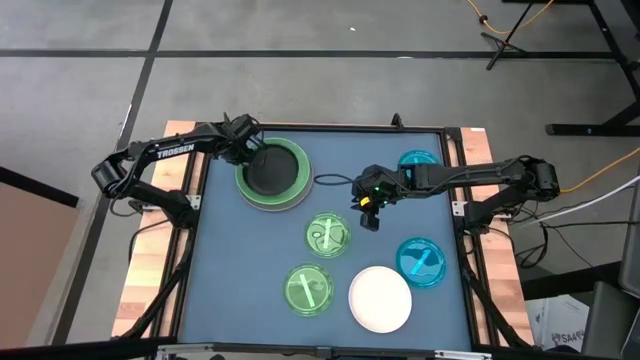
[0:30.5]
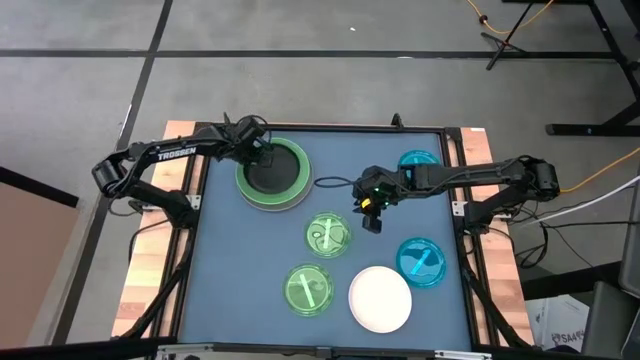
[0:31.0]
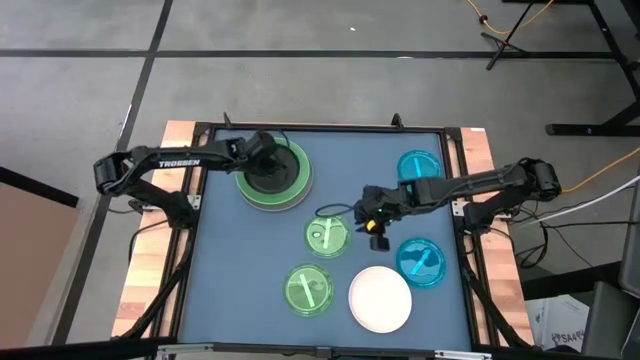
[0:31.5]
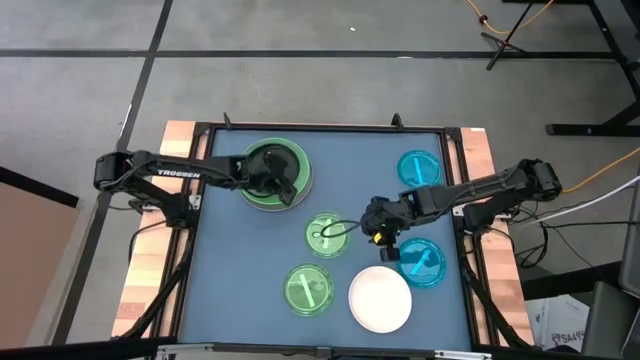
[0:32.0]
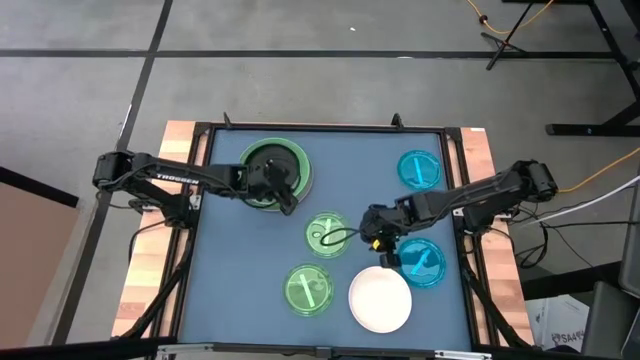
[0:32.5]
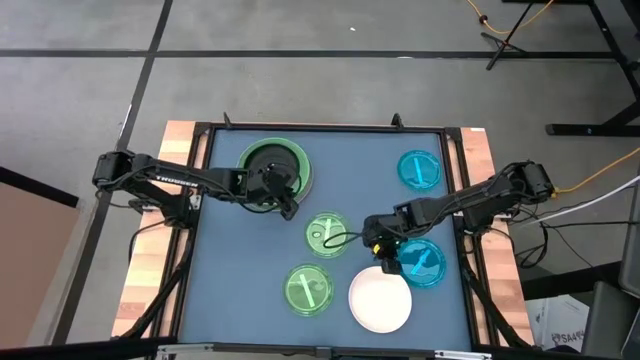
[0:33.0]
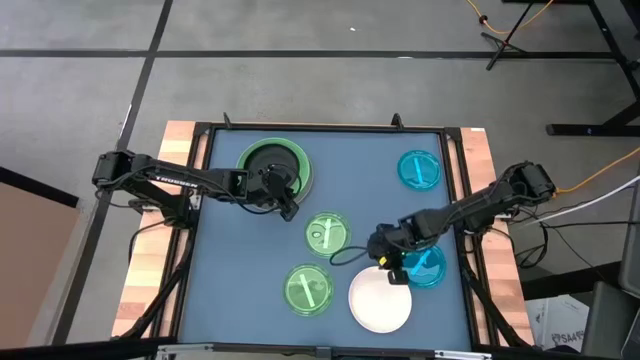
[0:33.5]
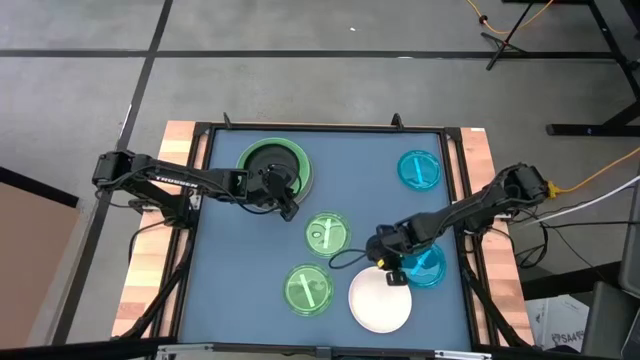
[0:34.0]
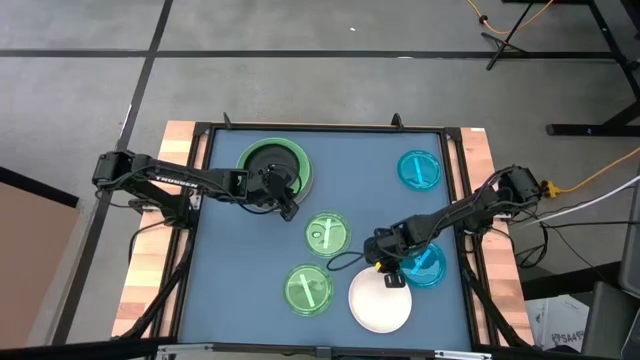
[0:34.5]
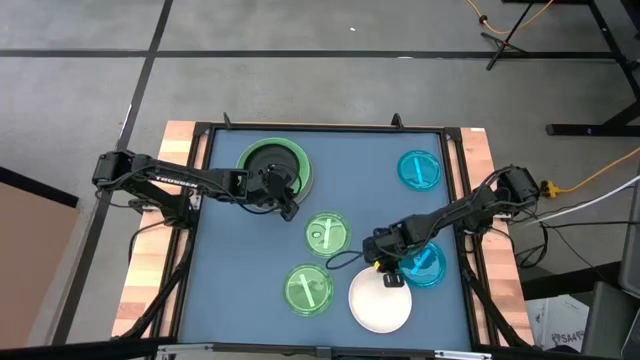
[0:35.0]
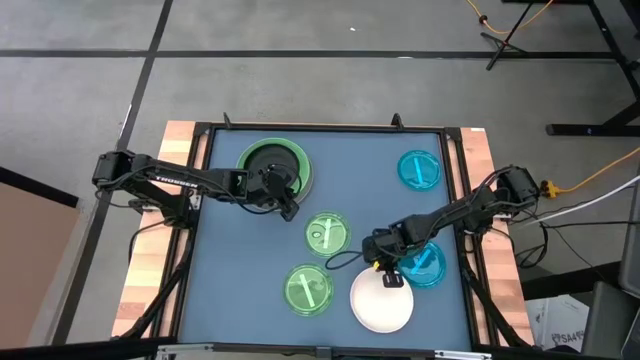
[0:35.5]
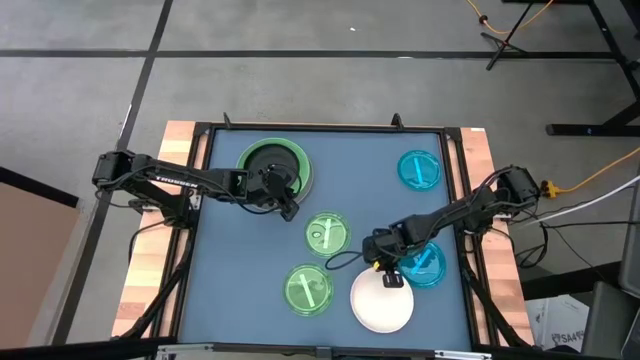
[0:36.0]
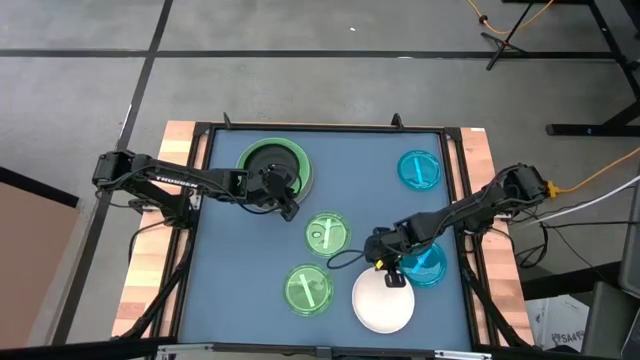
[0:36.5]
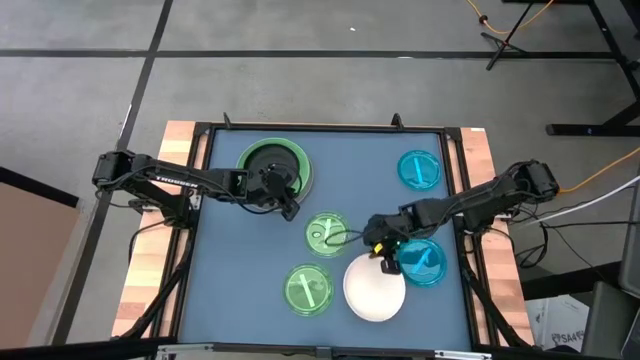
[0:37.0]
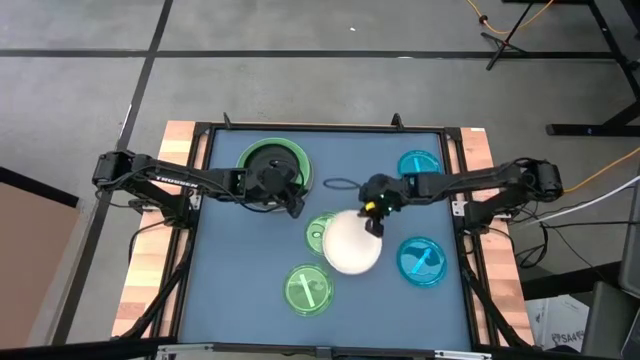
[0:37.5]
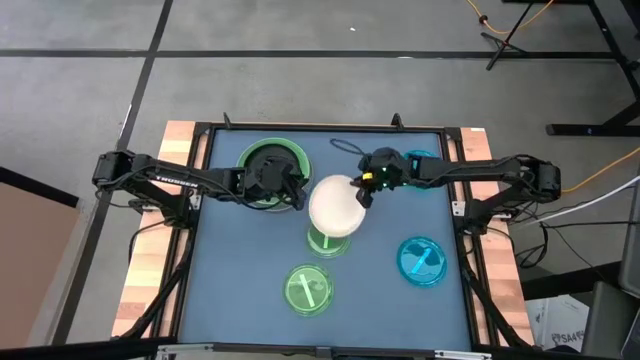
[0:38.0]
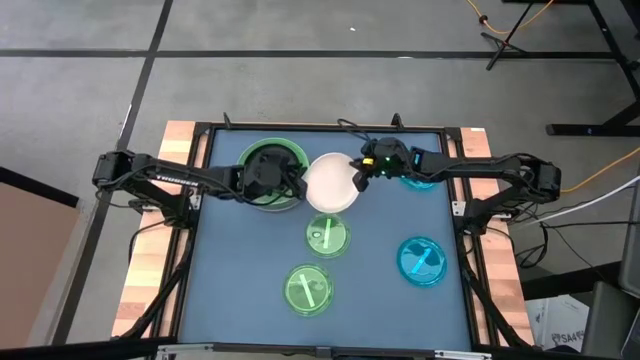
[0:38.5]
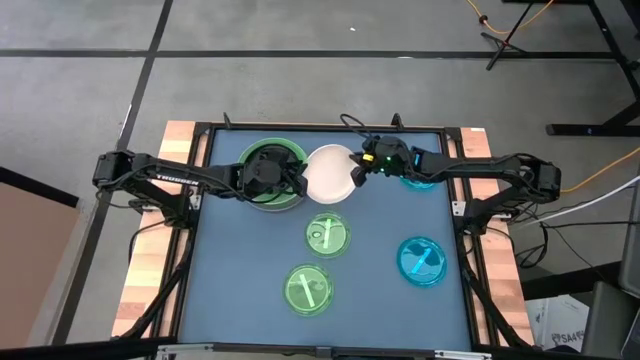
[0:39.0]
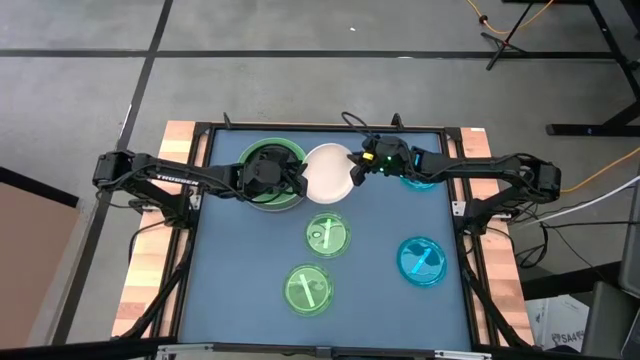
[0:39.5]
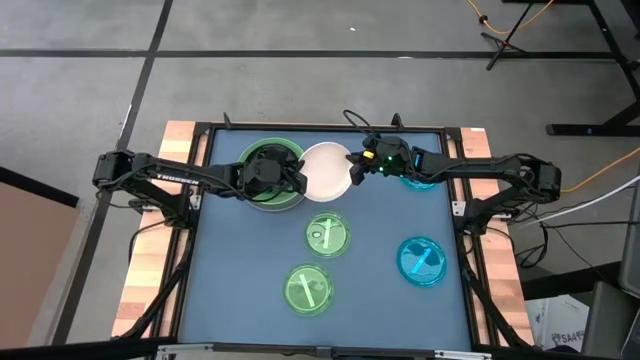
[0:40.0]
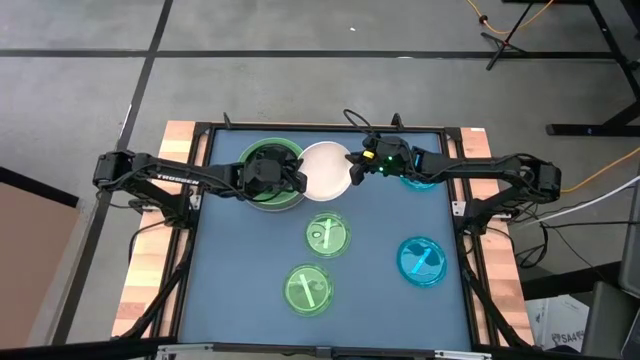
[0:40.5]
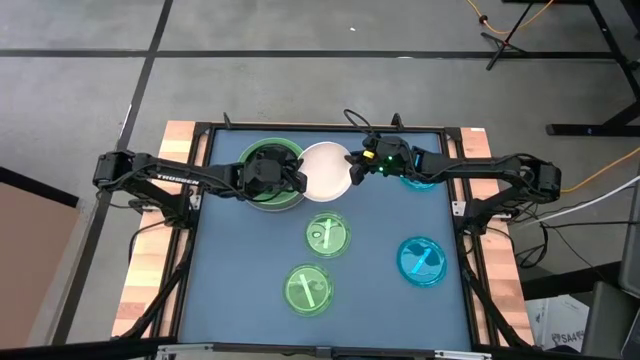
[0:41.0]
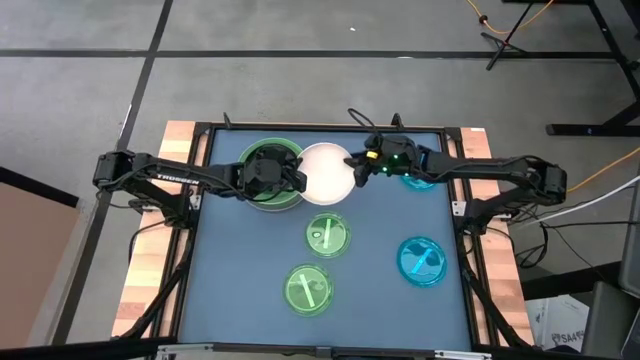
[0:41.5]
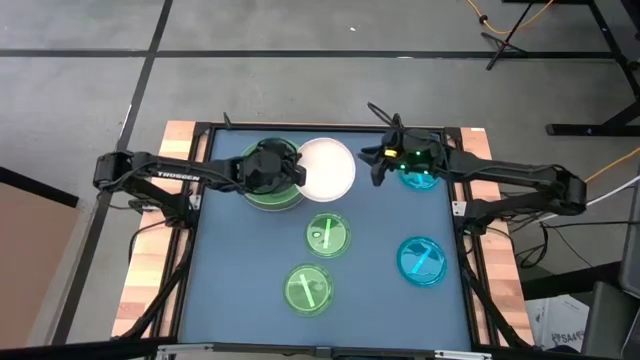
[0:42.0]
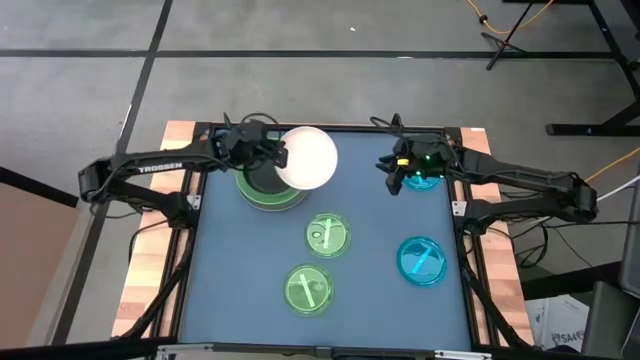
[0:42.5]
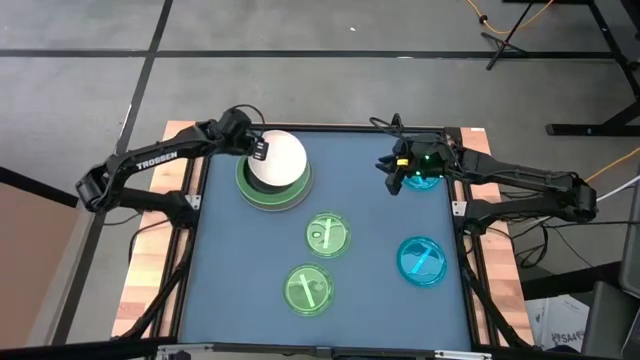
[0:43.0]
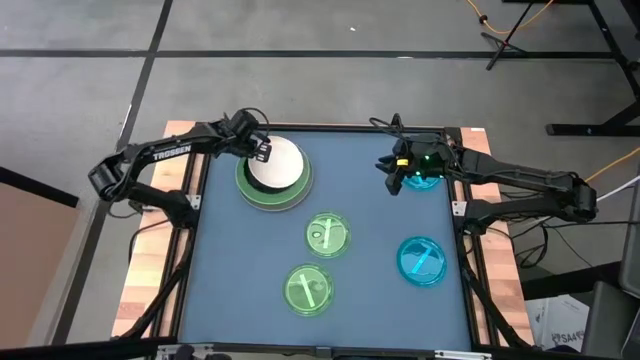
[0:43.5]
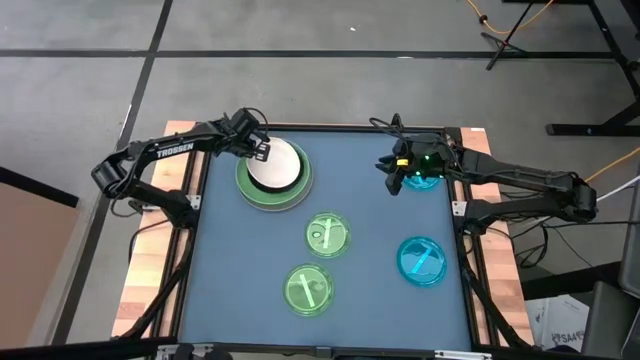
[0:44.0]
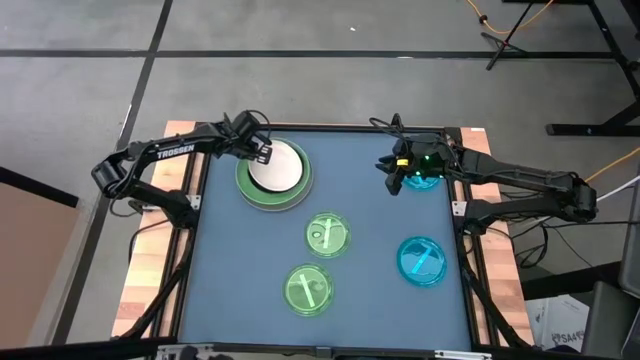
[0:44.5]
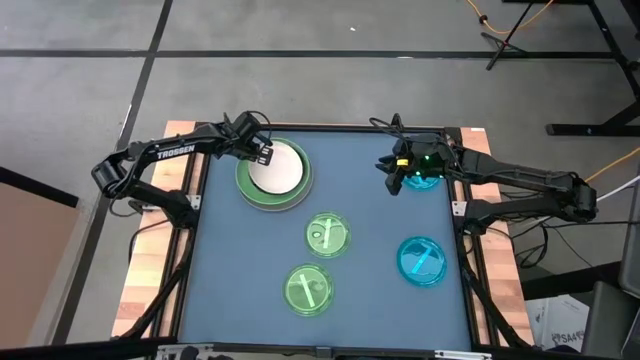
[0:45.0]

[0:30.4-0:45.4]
Task: Stack plastic plates
Stack the white plate on top of the black plate

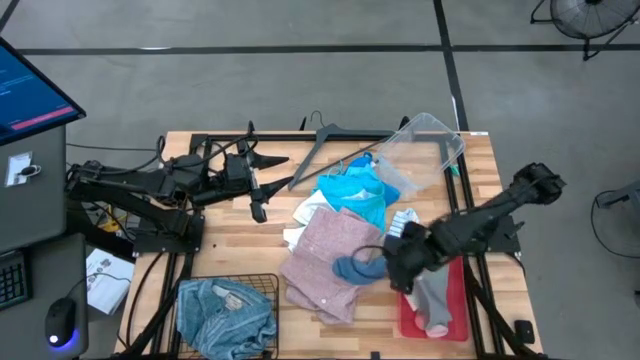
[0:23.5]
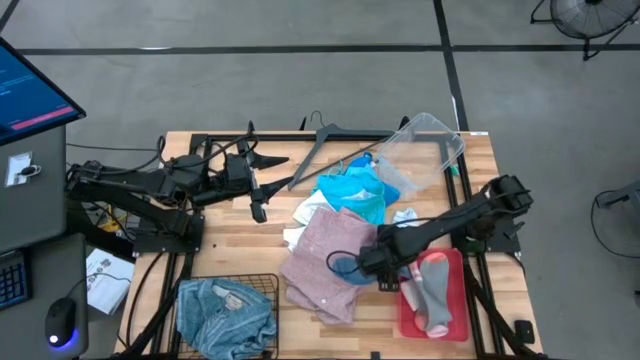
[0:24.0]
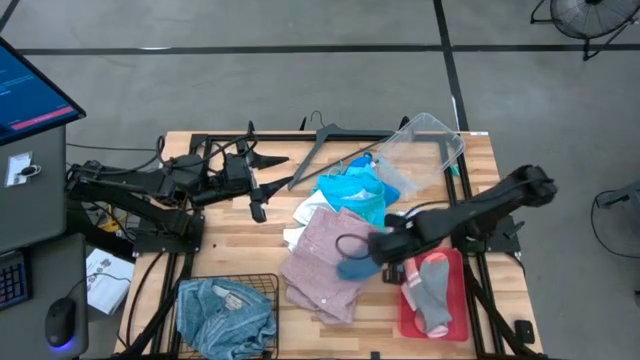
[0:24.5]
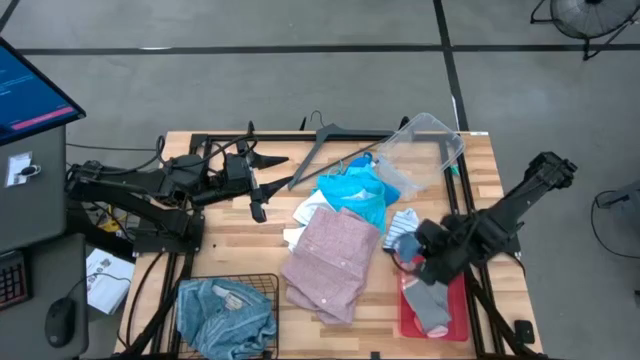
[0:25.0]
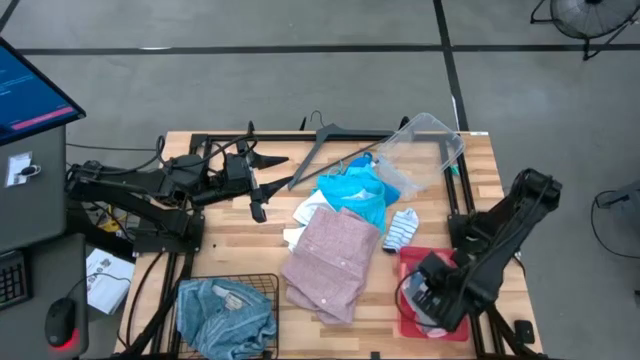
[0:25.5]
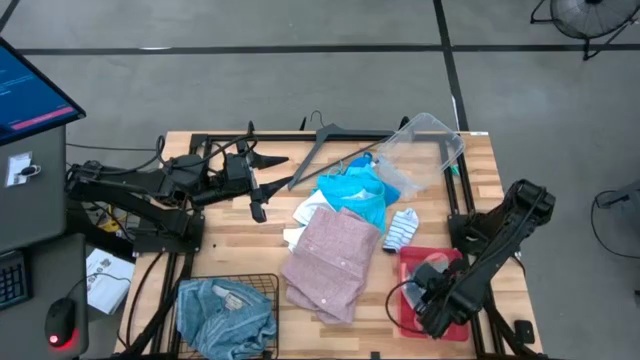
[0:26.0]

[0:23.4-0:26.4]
Task: Pick & Place Cloths
Put the blue sock into the red bin

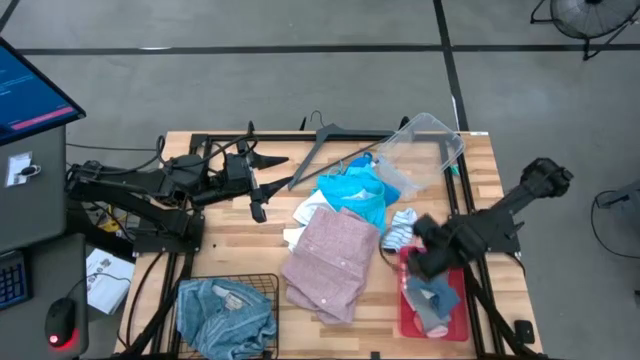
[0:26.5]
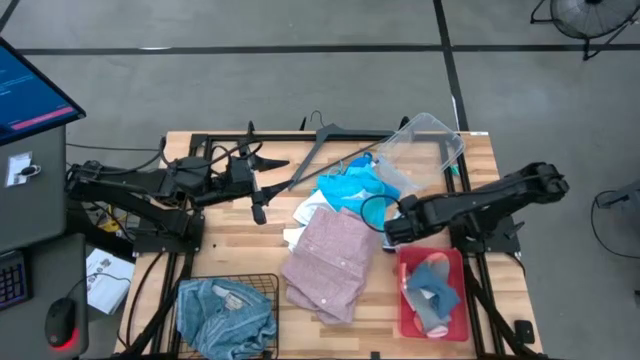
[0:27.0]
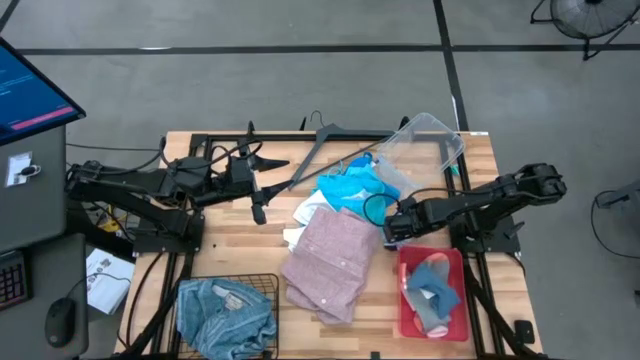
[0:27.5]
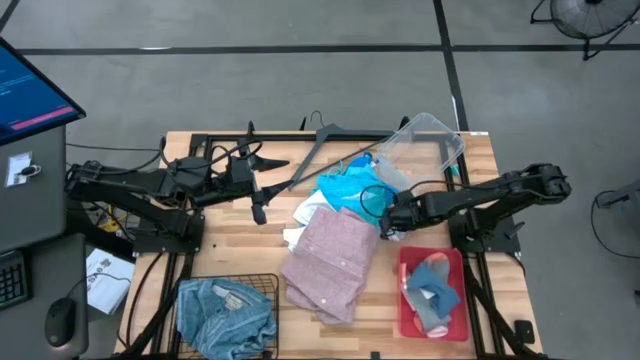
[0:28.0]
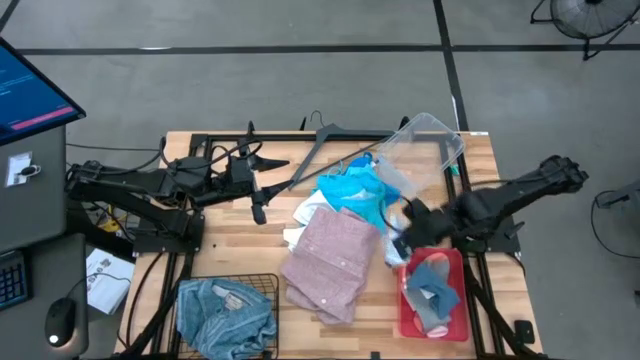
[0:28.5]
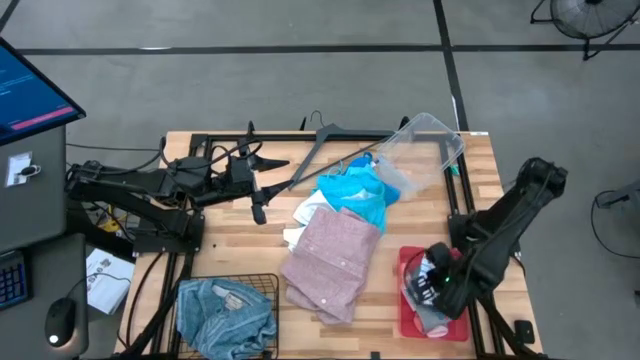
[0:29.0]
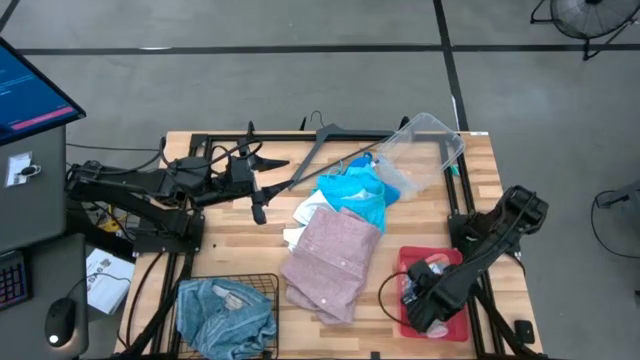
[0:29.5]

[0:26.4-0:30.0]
Put the white striped sock into the red bin
